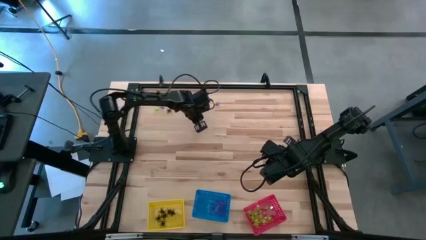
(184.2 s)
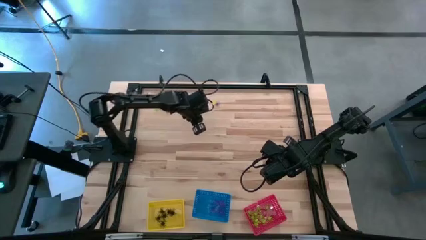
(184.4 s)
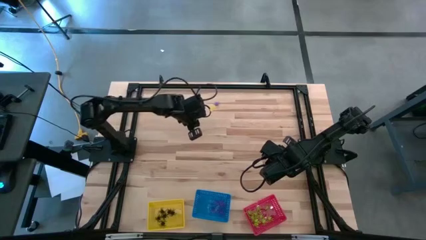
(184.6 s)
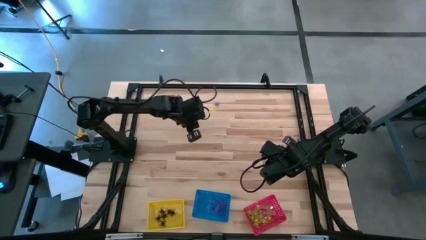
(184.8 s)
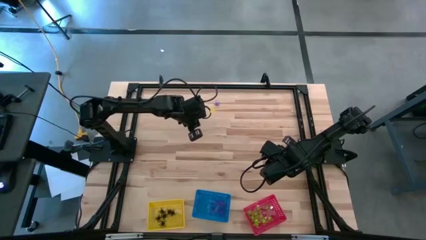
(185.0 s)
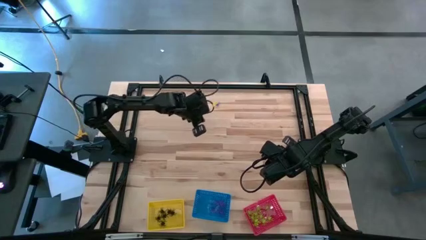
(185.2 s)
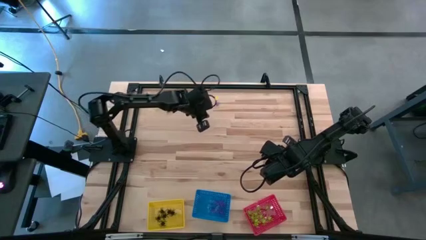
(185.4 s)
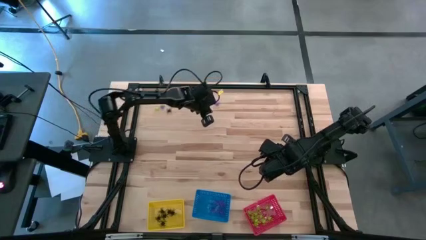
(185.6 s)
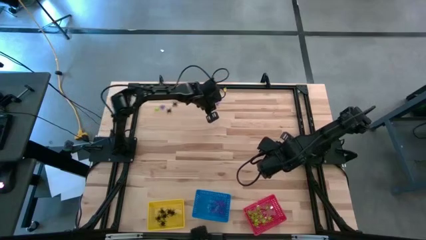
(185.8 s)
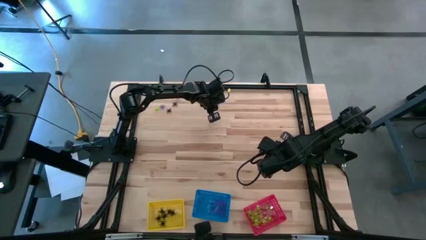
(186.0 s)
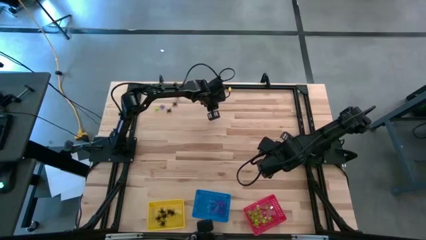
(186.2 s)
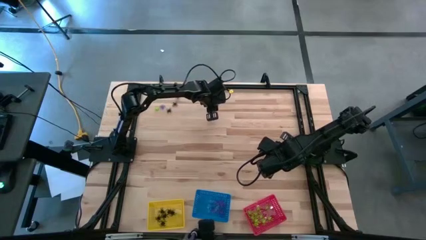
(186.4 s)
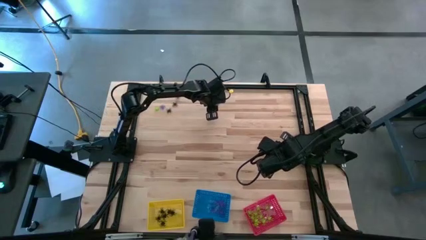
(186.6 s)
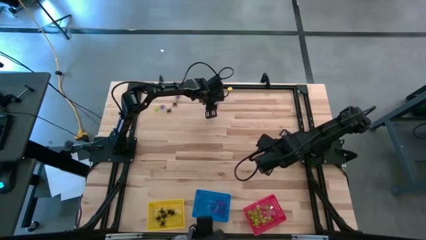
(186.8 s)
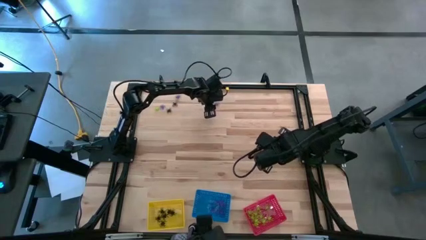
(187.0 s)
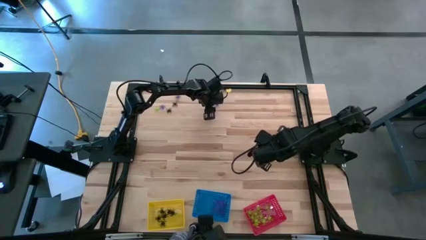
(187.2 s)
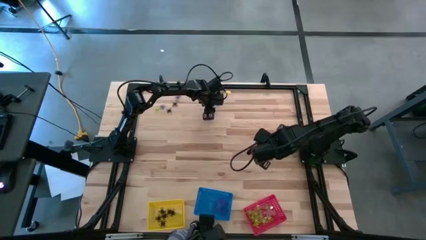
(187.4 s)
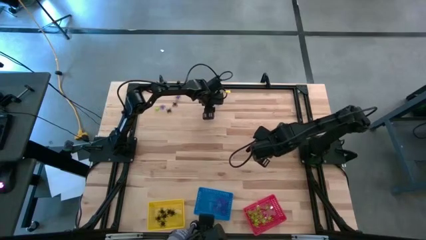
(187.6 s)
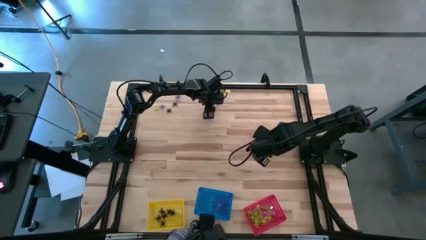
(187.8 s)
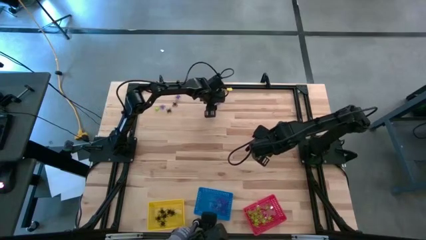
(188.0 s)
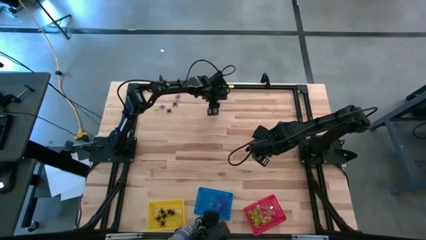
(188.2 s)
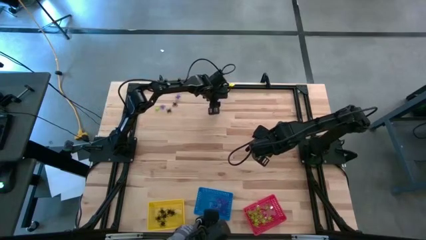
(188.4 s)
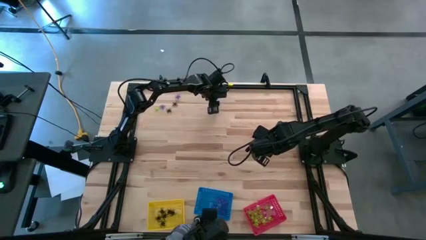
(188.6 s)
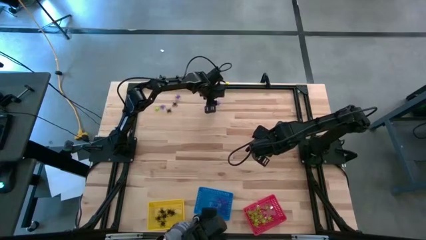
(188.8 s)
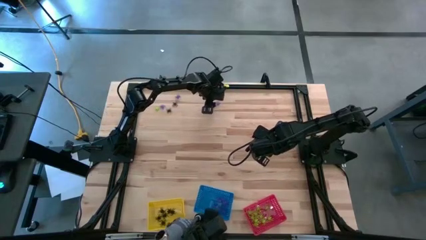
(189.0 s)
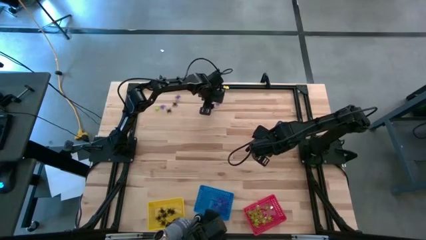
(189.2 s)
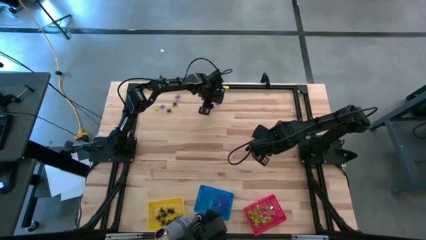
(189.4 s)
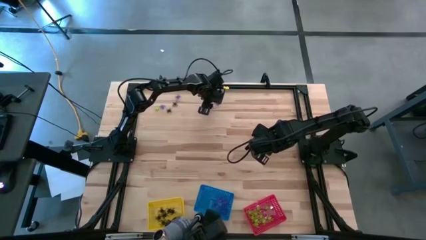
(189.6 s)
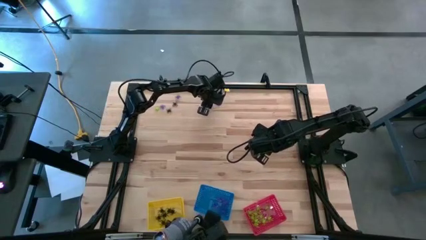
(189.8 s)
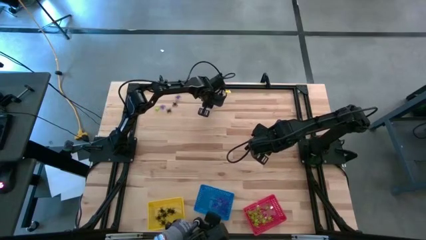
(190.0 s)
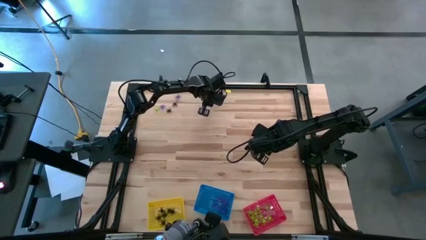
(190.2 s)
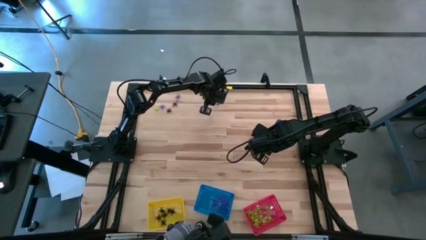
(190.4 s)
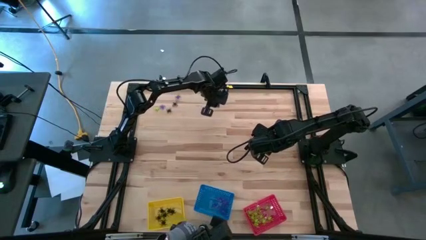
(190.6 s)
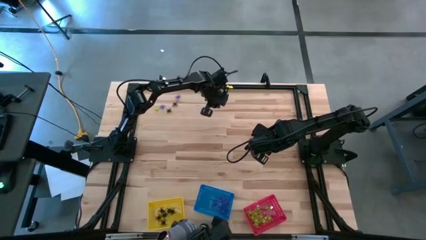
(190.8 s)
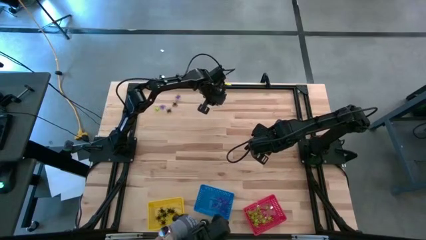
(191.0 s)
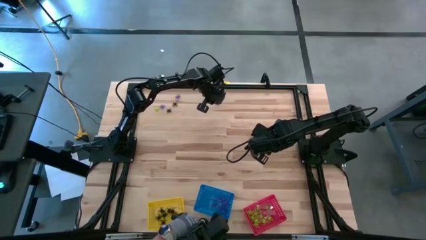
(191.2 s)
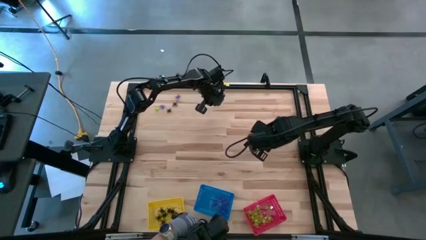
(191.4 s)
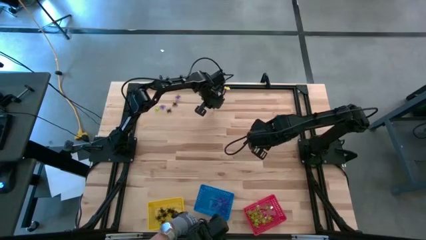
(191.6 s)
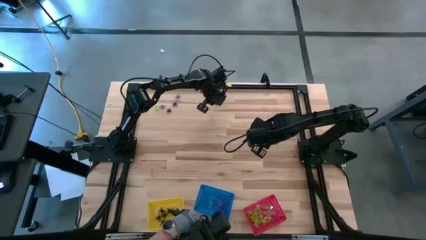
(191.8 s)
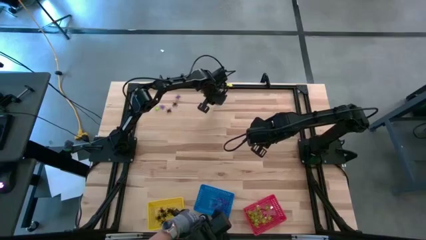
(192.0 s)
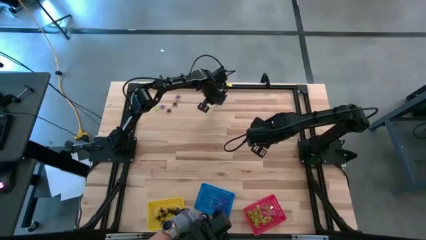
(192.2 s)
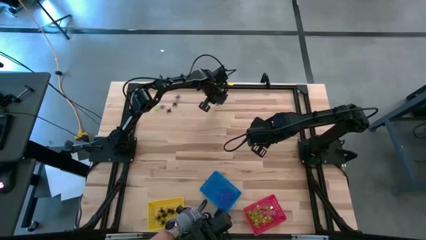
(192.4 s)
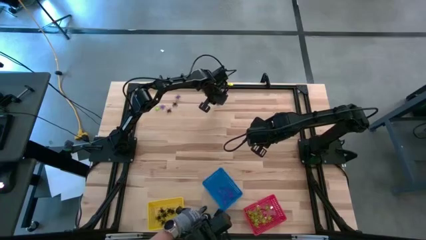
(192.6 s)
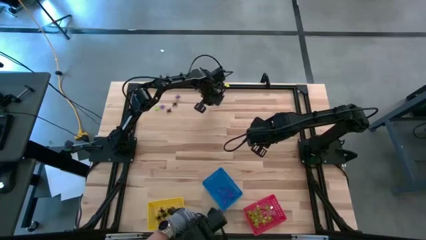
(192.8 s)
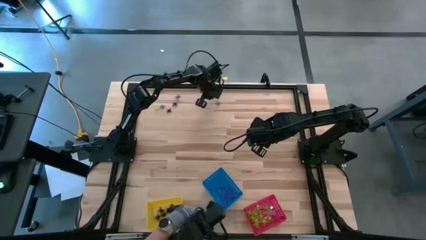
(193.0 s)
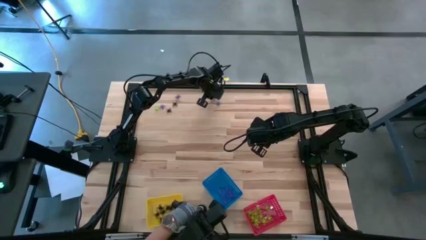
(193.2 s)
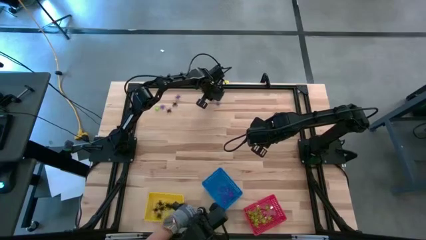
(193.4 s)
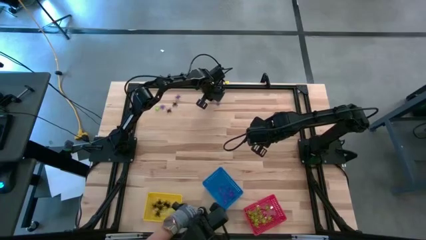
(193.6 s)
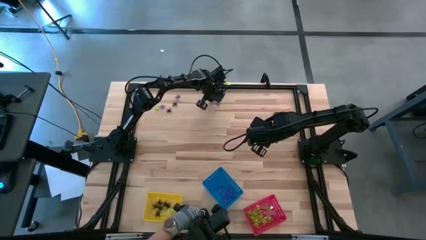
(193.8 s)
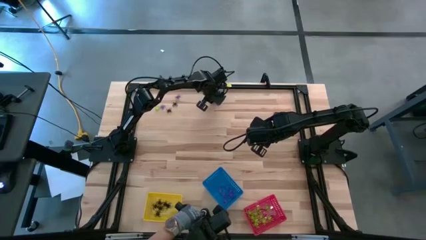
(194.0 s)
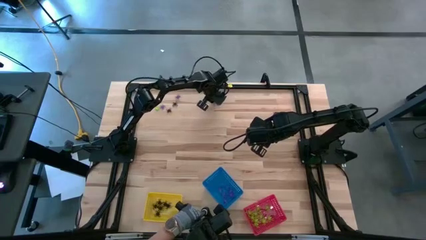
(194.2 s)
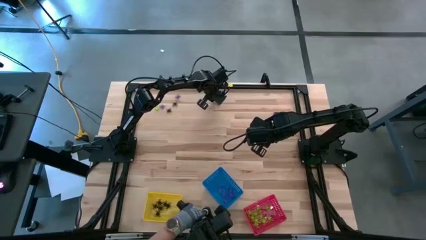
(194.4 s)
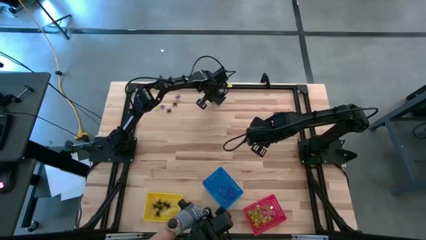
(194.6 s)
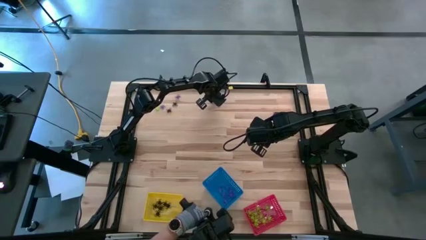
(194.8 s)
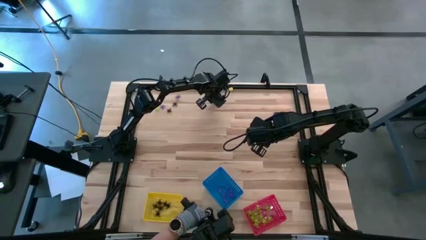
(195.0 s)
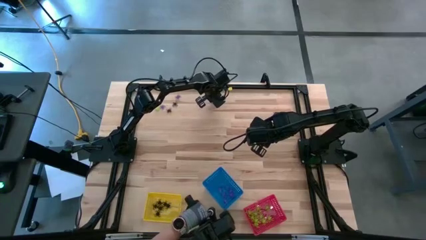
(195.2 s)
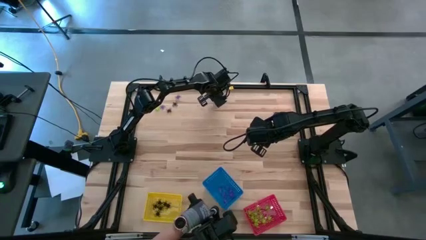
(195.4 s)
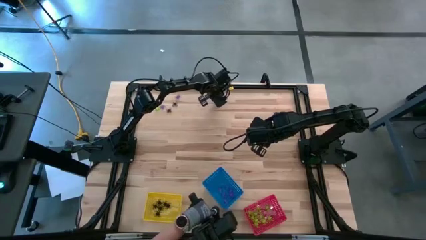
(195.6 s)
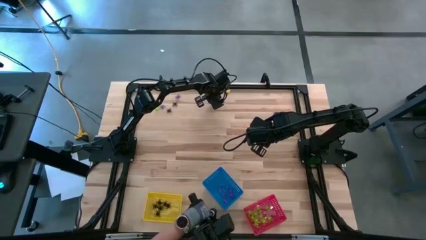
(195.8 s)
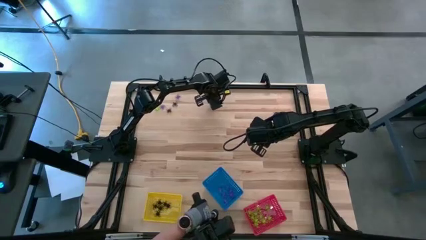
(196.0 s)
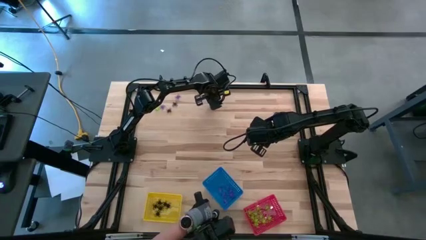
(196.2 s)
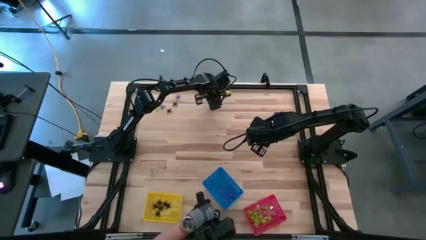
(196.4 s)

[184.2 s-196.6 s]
Task: Sort Halloween decoration
Put the violet spider toy into the blue bin

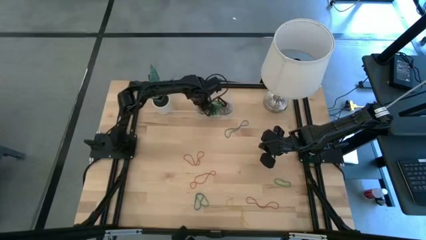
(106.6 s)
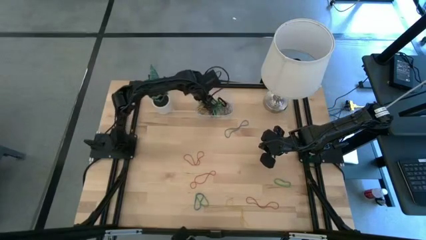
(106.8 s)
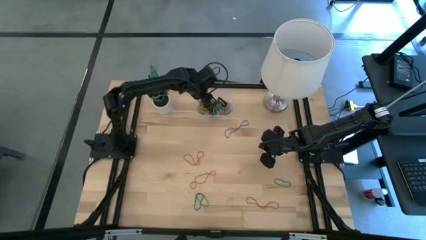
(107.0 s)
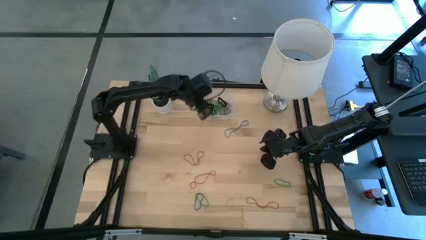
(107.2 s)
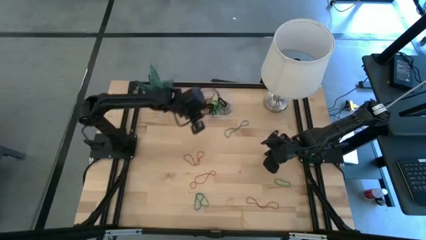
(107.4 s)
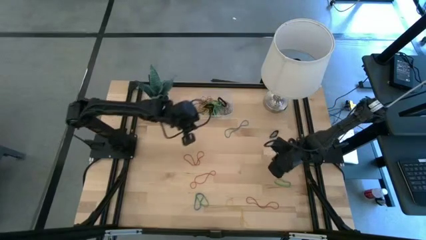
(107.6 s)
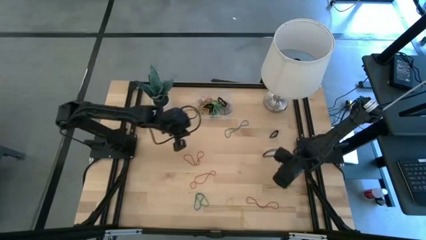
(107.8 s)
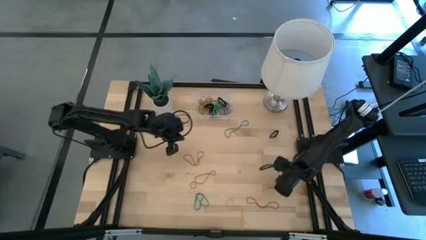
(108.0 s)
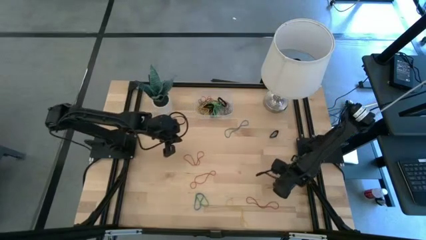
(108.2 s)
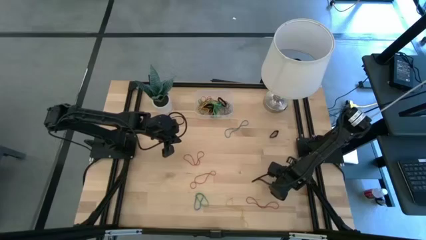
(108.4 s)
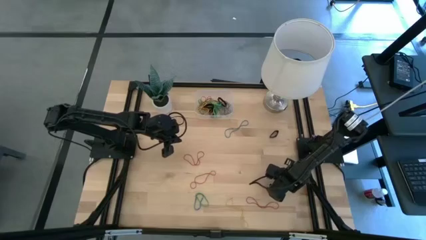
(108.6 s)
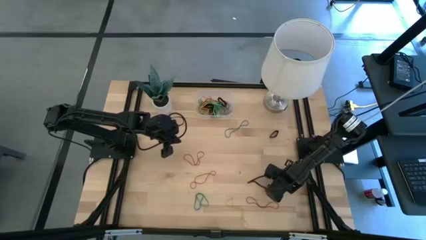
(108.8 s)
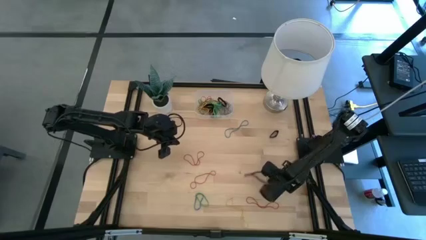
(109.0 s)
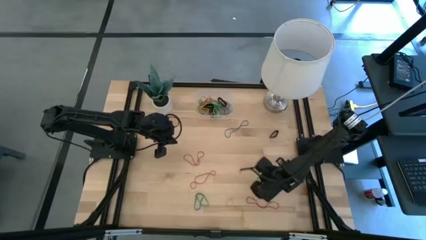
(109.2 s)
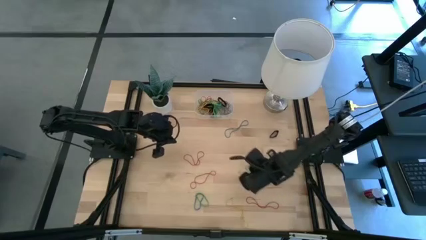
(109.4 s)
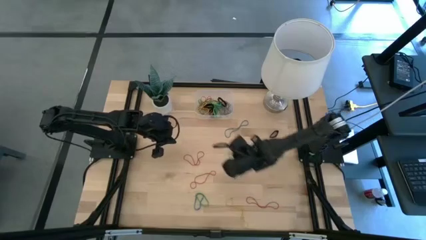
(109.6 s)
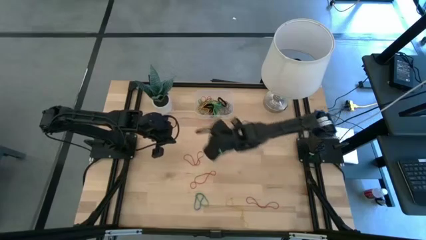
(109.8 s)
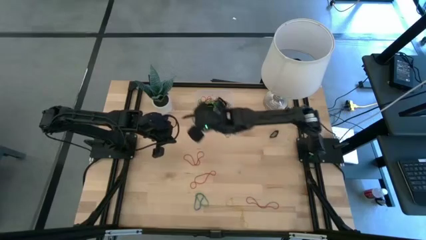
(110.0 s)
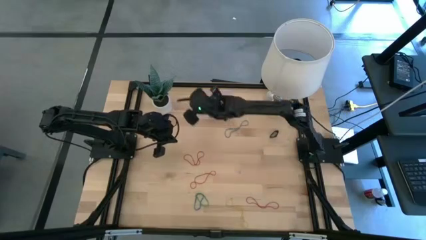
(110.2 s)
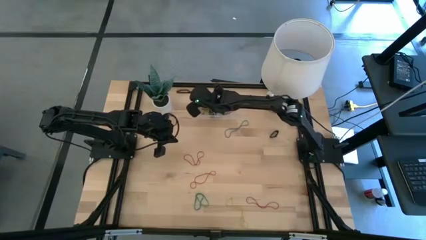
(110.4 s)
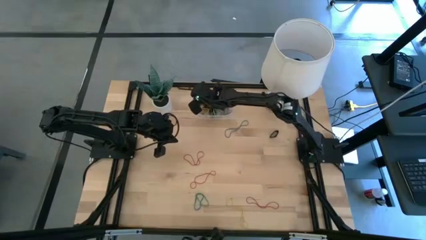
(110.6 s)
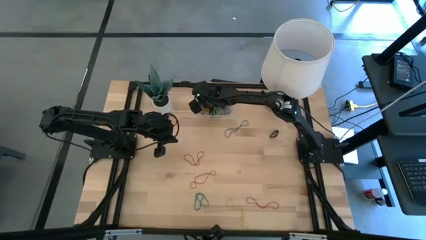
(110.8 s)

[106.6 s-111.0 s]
Task: Pick and place rubber bands into bin
Put the green rubber band into the transparent bin
